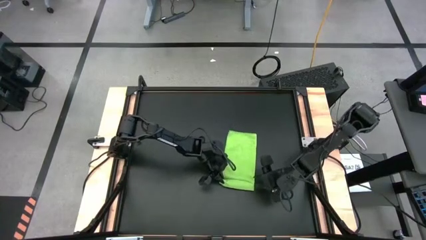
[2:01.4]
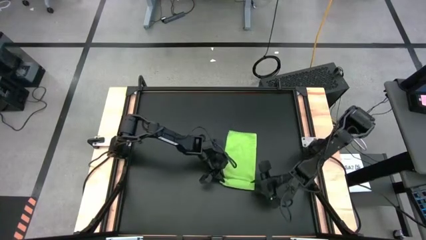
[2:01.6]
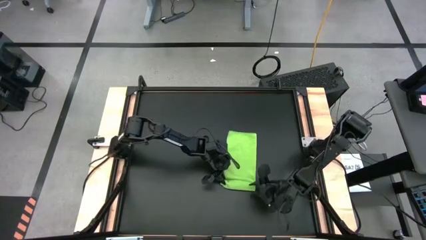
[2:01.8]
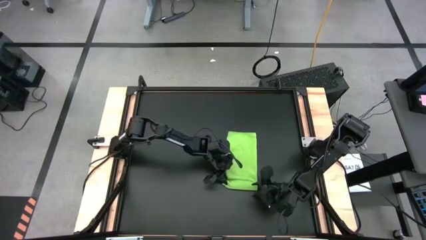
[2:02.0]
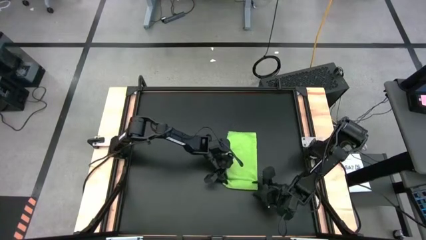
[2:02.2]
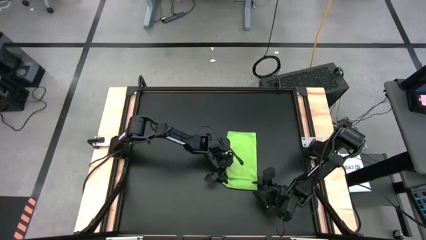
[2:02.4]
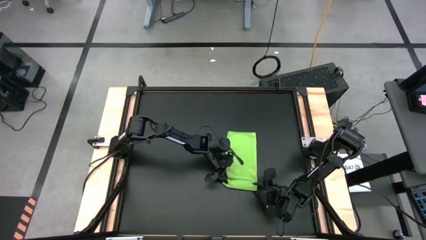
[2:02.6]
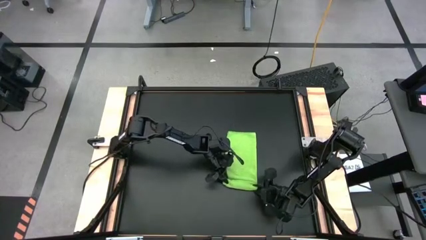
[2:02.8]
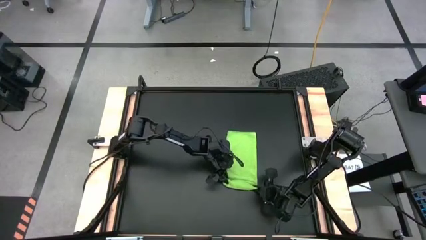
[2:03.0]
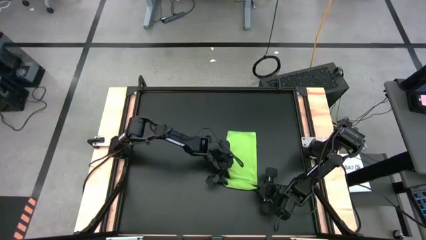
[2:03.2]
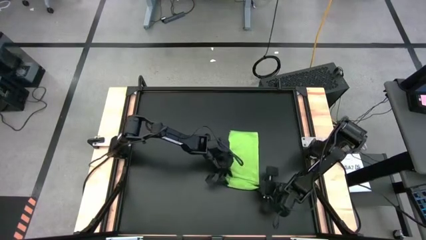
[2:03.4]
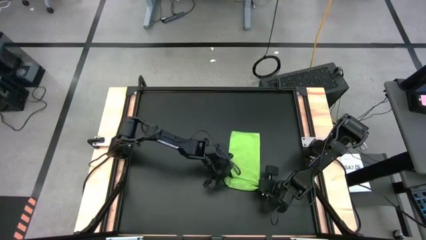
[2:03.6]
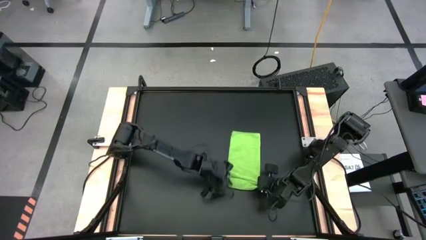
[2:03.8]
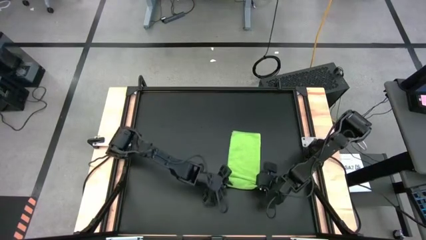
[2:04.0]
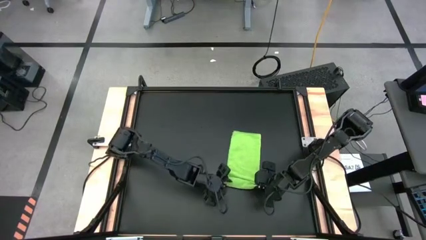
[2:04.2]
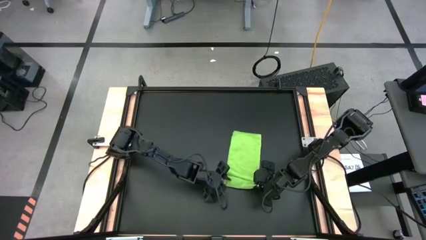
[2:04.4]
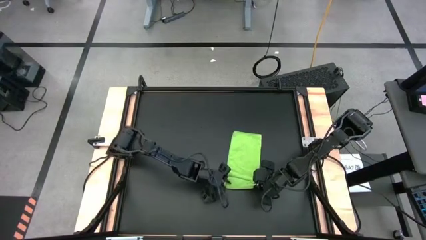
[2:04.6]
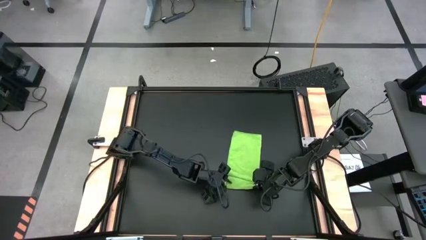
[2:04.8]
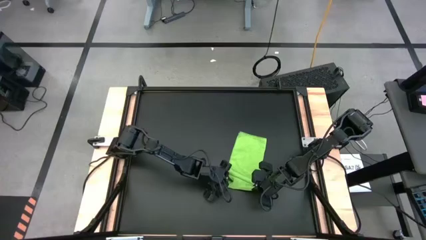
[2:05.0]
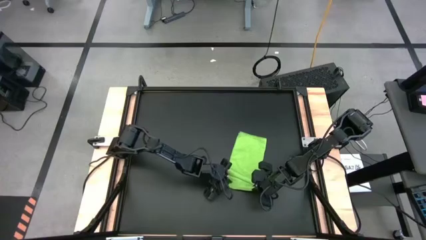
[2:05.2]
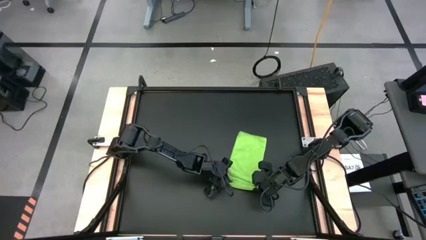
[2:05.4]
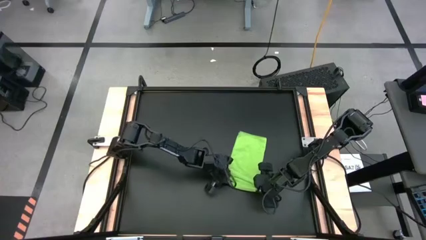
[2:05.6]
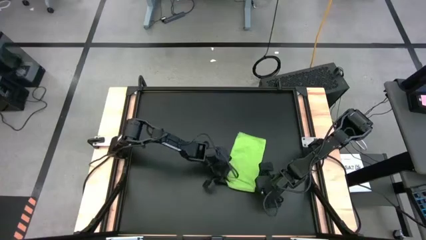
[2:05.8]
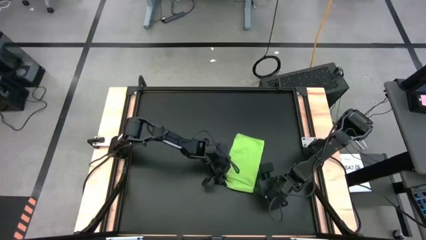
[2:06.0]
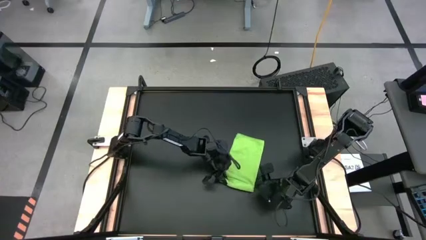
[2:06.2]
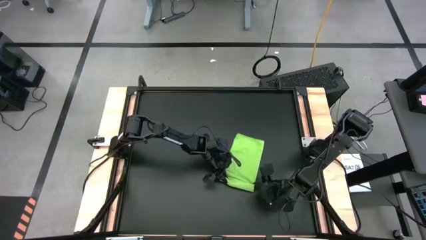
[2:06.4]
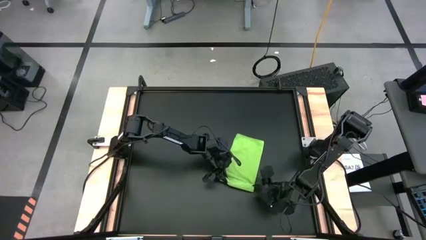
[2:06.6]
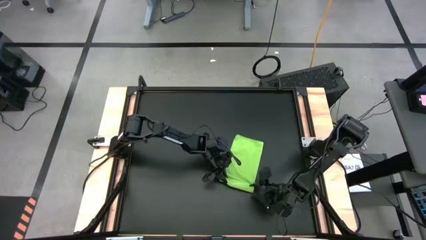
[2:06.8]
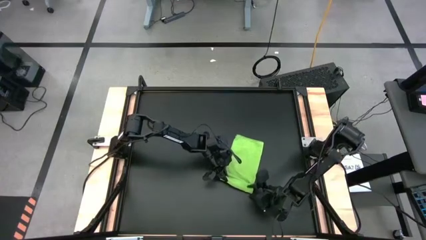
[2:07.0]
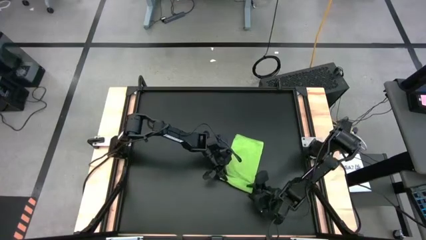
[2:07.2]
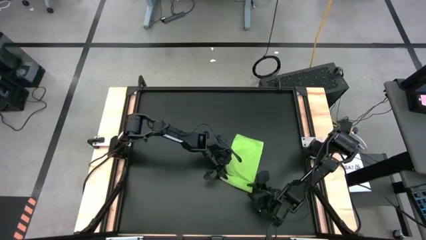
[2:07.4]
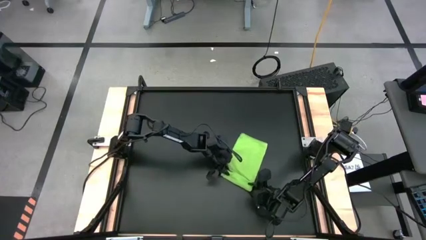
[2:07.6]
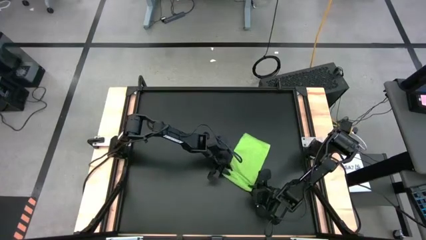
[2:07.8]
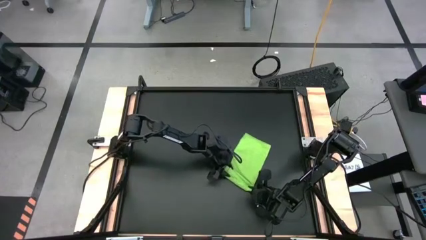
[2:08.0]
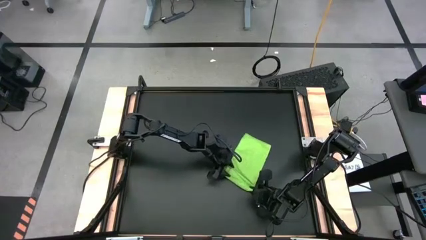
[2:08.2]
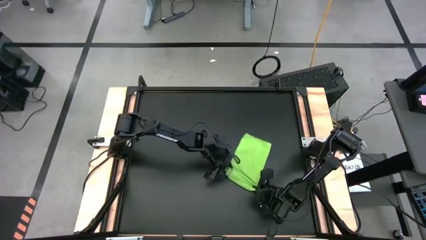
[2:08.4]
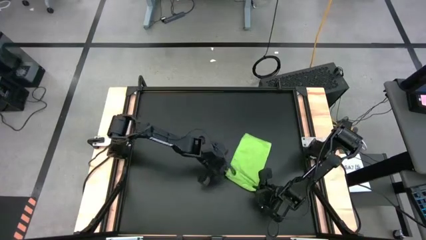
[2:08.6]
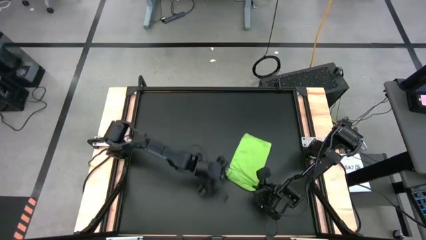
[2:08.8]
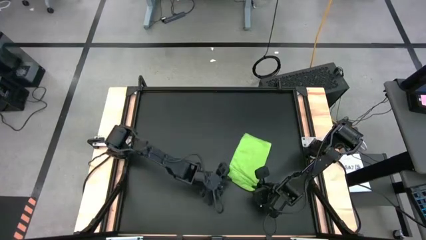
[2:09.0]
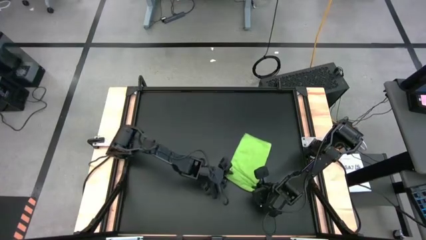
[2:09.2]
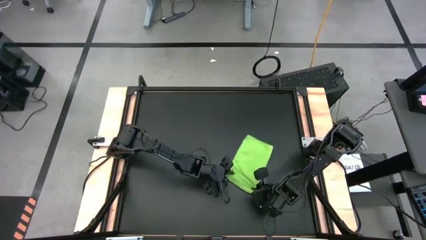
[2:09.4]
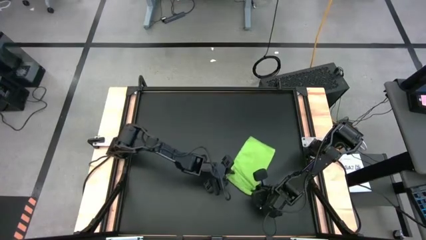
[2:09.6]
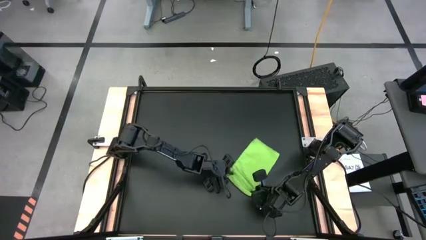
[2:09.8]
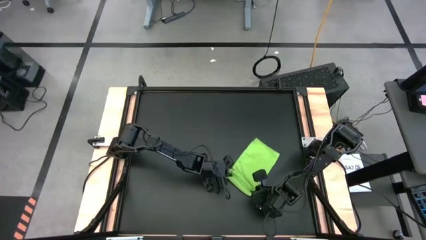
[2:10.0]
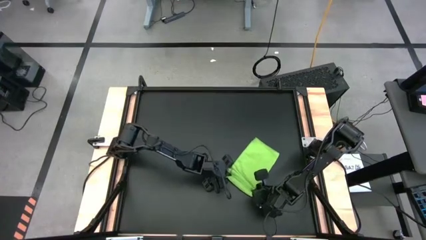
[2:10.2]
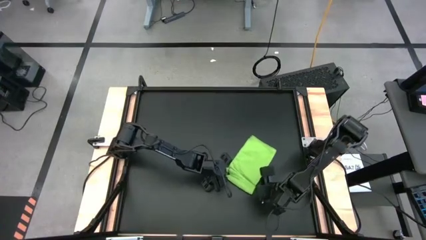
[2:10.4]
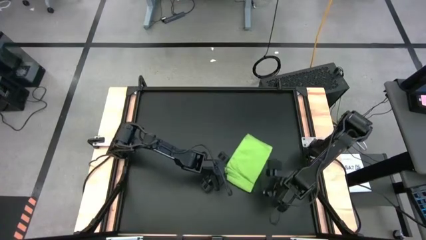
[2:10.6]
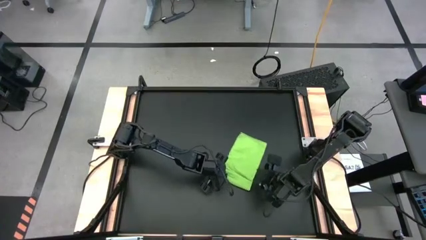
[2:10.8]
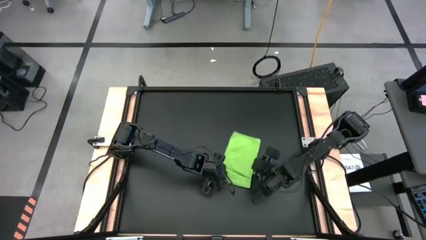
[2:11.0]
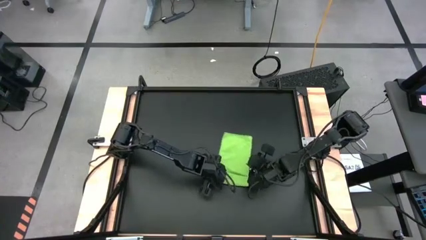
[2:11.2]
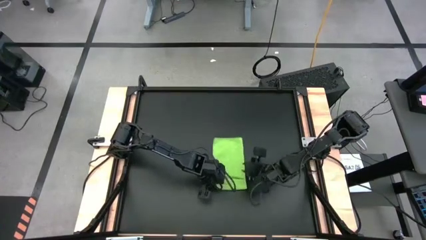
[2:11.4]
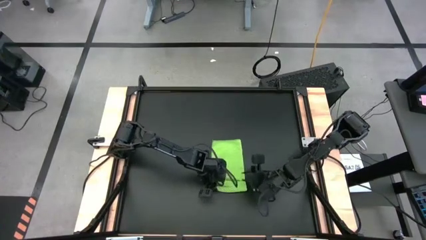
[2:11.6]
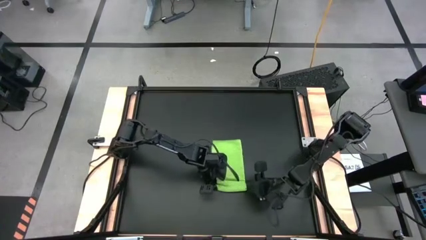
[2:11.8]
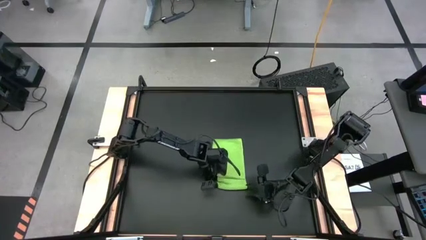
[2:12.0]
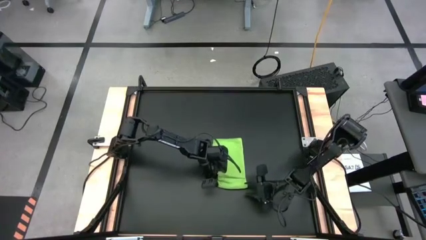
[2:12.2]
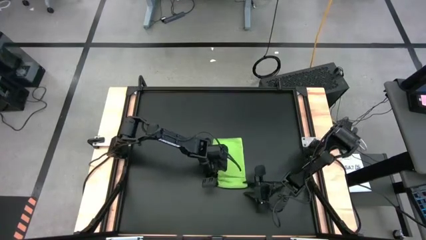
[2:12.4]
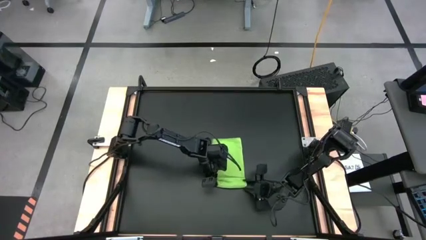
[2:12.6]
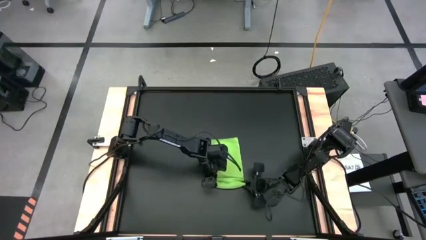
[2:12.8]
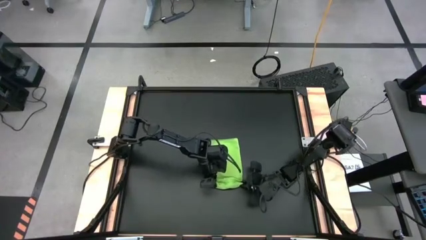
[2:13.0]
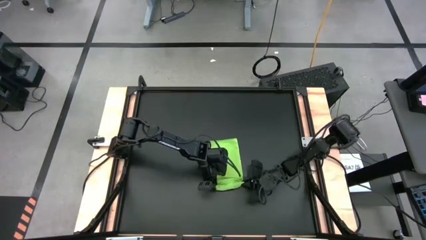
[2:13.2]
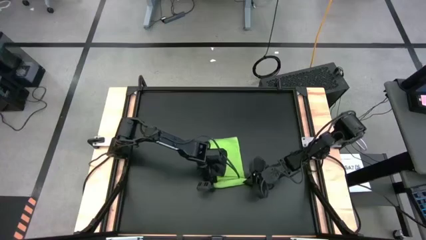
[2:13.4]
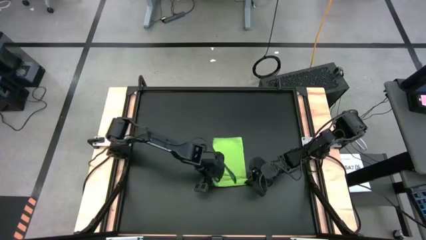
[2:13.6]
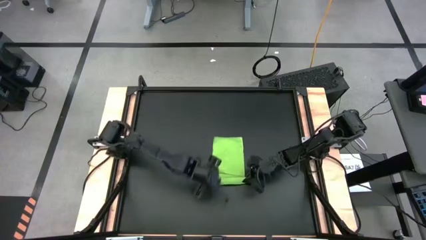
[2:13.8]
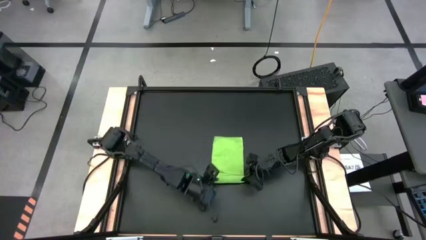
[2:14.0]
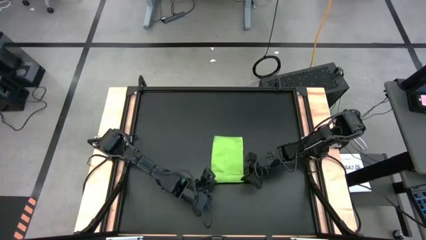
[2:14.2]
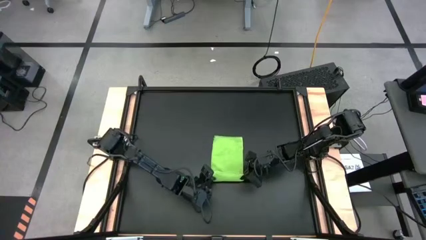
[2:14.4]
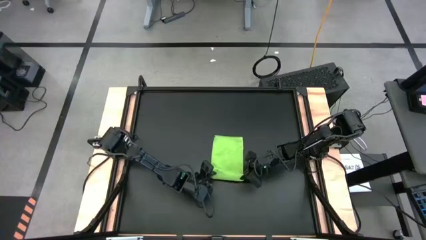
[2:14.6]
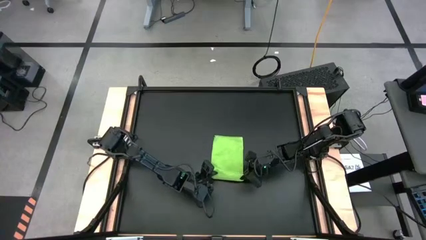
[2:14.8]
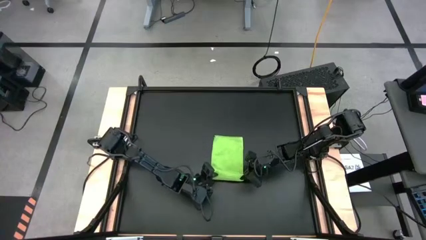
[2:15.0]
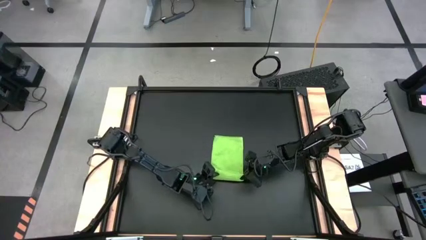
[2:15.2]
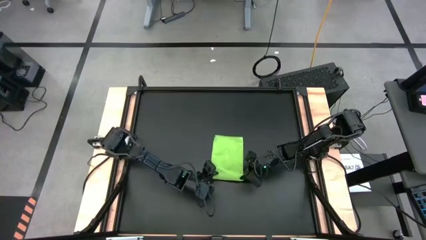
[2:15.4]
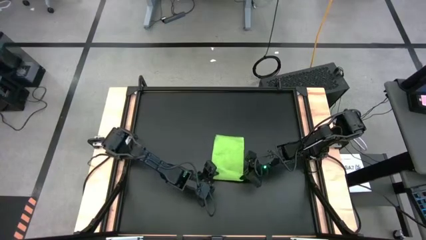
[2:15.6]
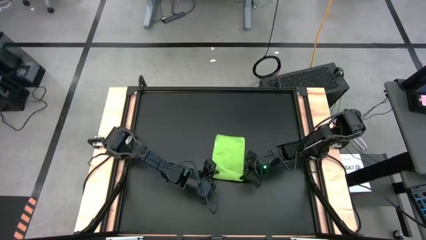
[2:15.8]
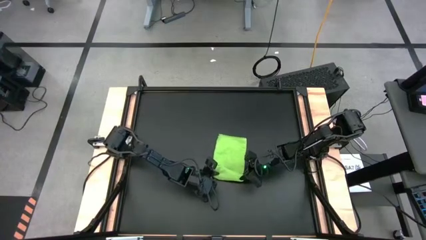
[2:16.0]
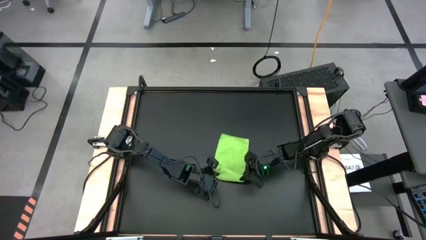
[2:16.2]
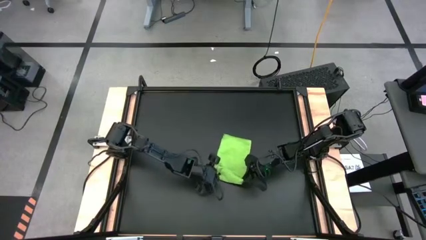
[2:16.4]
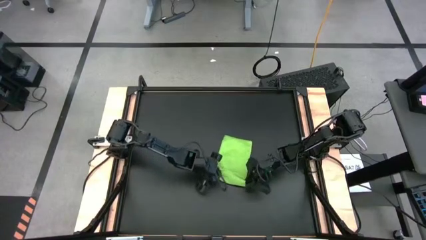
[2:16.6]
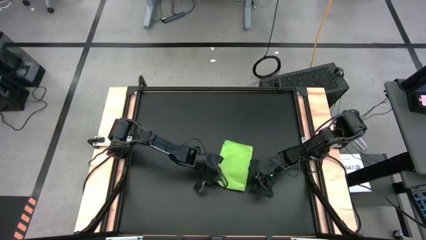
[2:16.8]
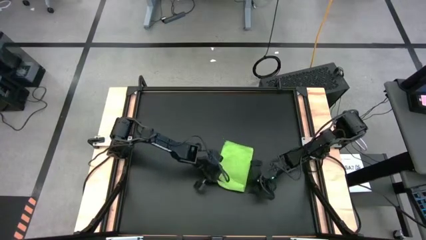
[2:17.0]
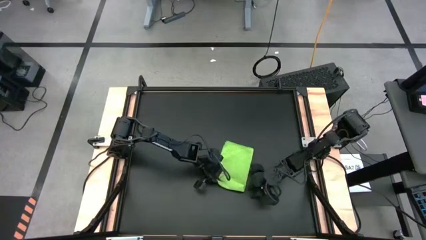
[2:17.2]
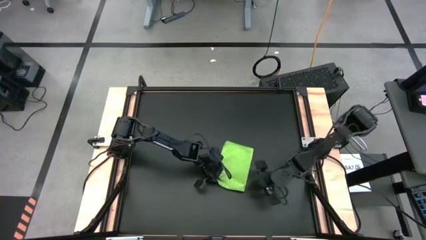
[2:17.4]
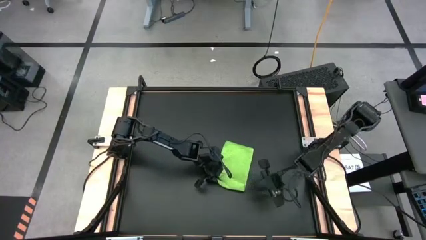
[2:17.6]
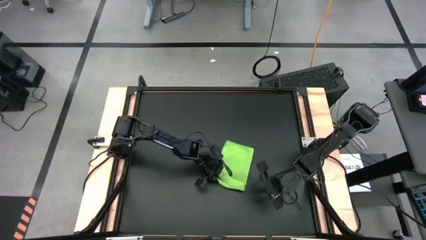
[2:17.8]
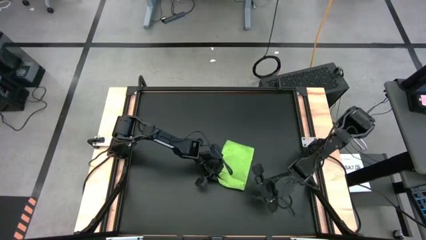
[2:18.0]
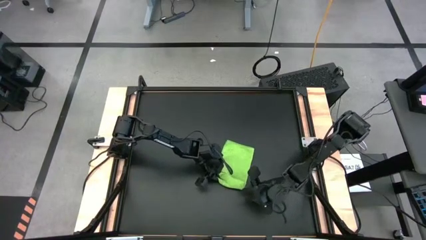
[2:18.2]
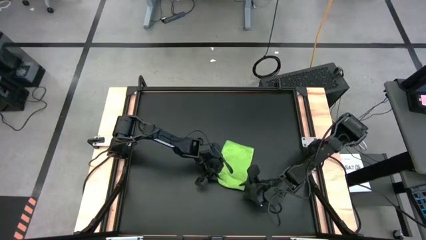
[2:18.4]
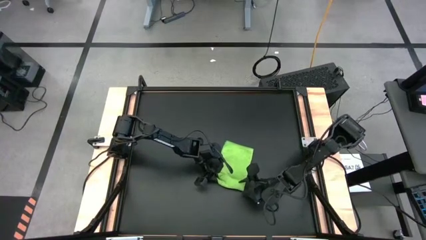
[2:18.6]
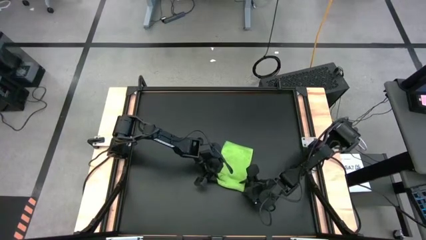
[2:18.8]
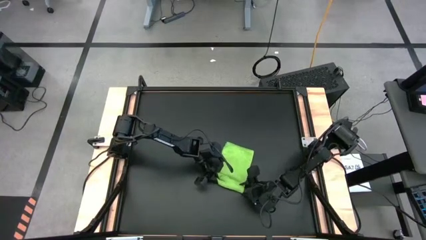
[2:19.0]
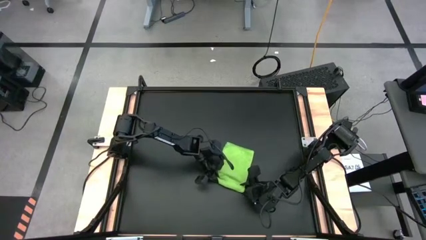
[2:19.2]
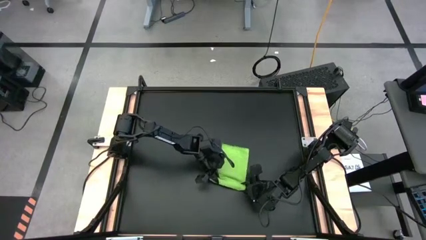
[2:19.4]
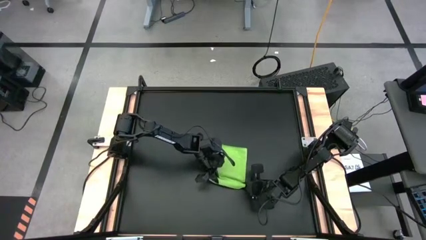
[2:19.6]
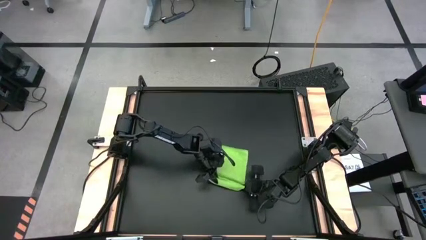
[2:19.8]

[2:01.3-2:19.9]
Task: Roll towel into tight, uniform cylinder
Roll the green towel
